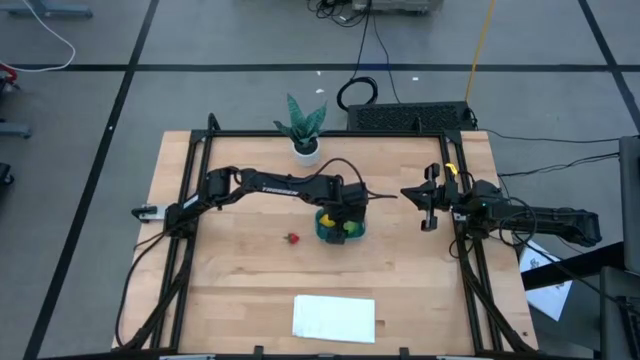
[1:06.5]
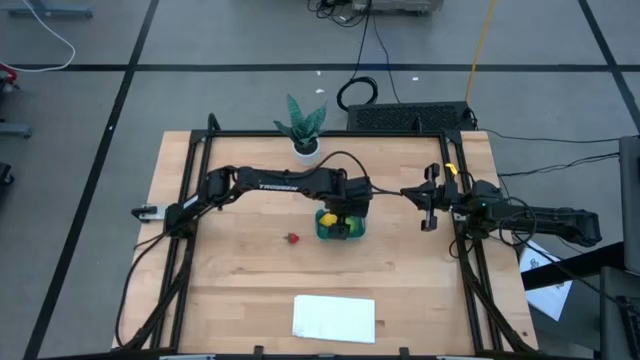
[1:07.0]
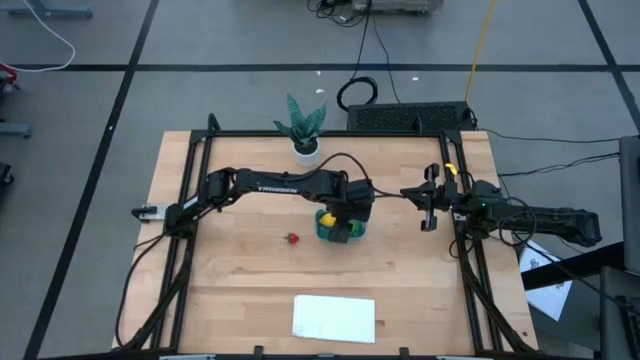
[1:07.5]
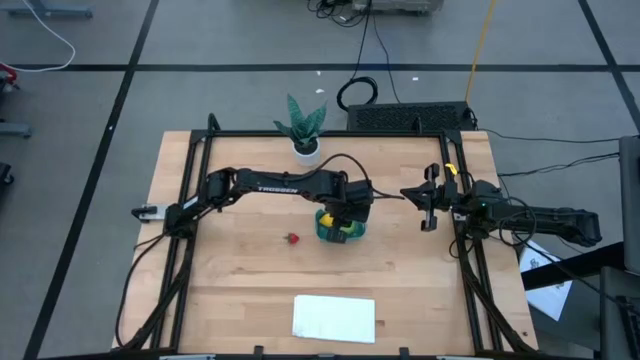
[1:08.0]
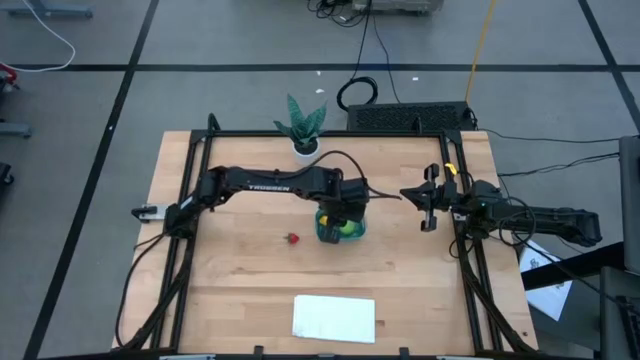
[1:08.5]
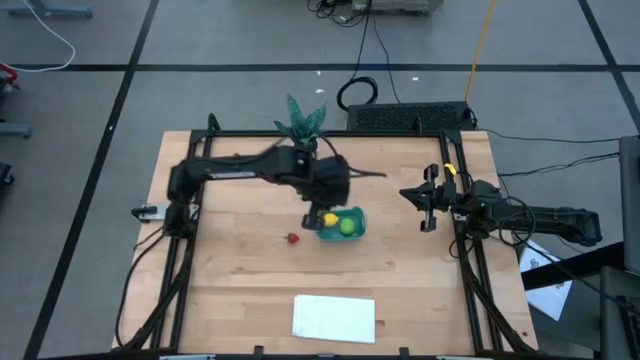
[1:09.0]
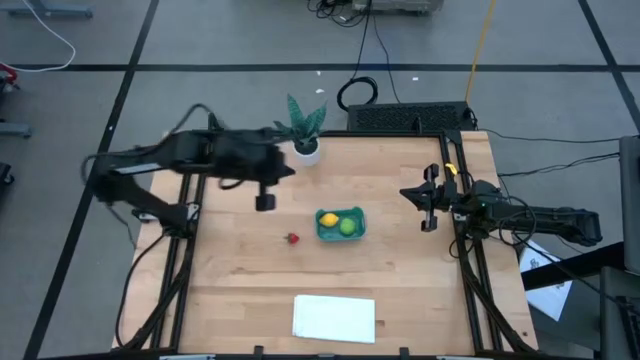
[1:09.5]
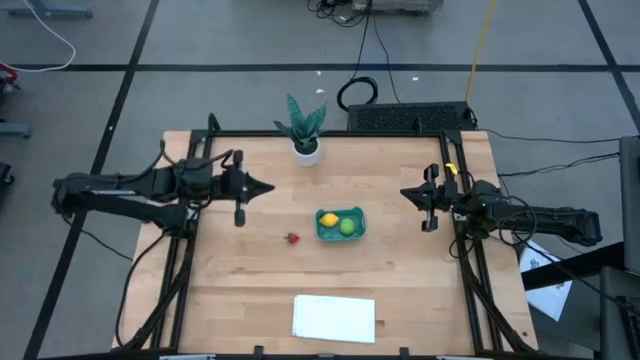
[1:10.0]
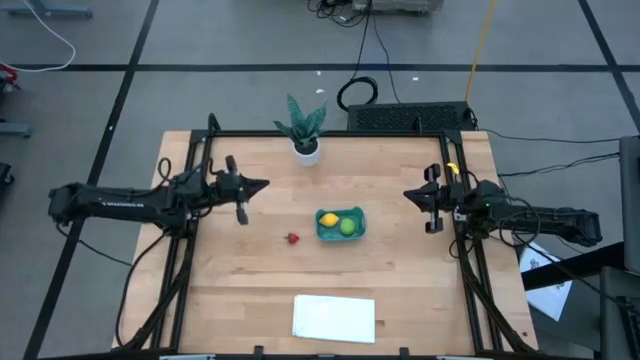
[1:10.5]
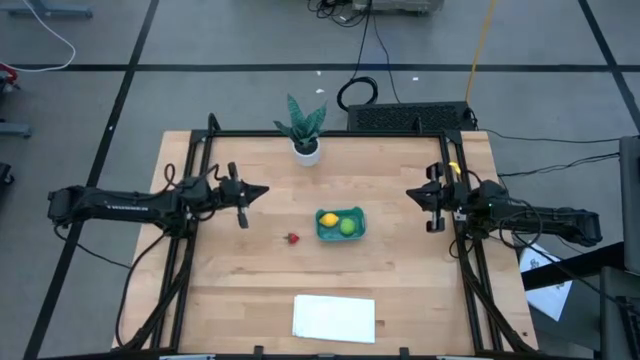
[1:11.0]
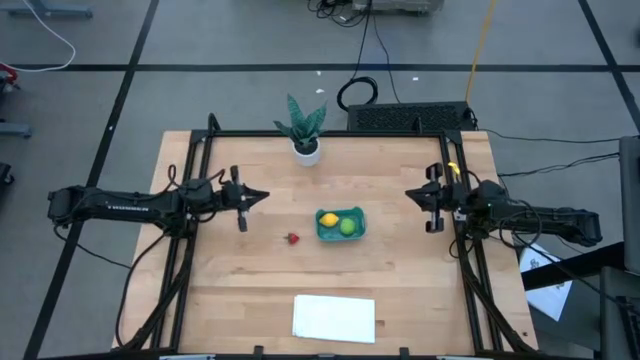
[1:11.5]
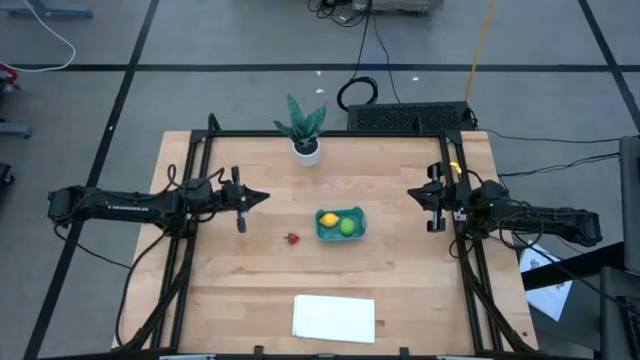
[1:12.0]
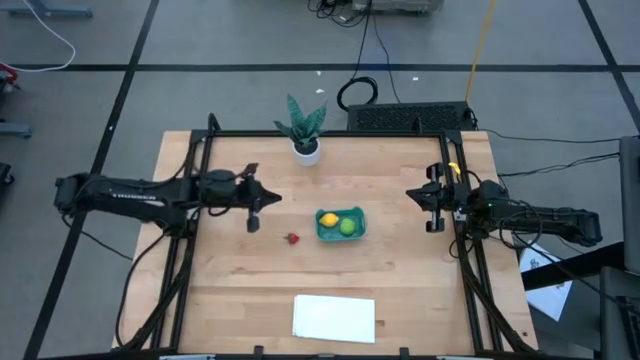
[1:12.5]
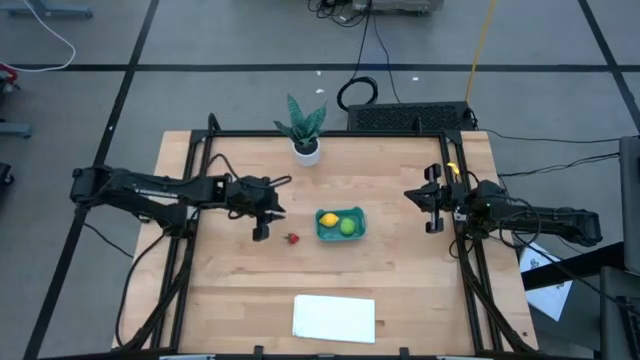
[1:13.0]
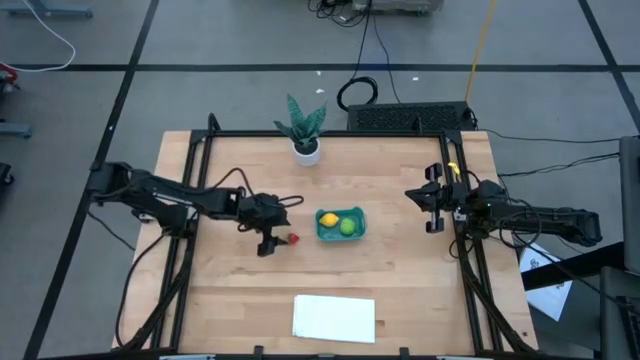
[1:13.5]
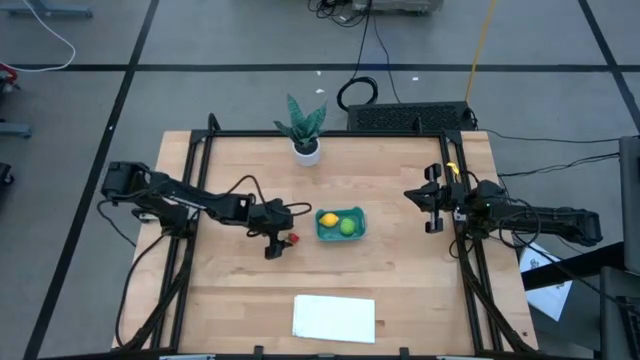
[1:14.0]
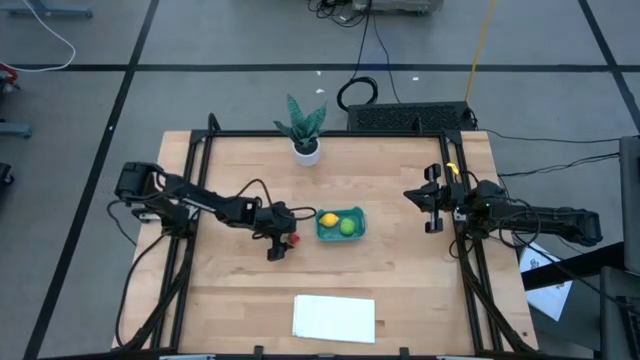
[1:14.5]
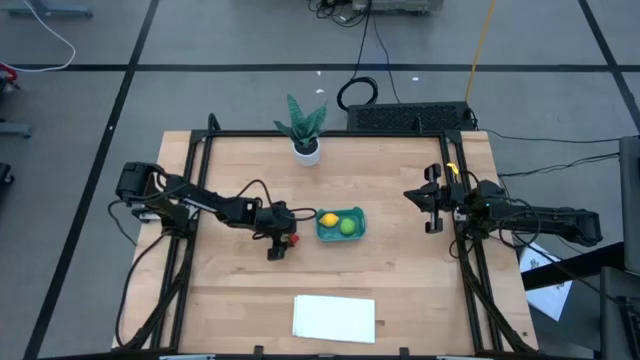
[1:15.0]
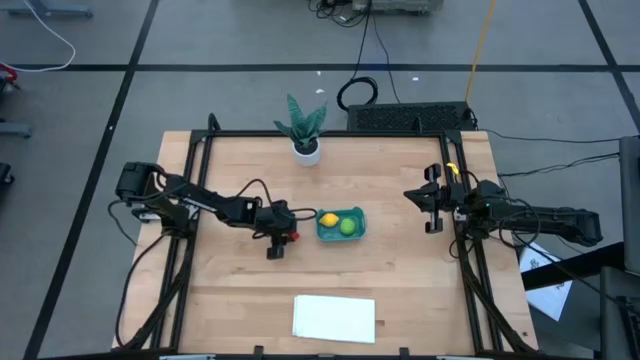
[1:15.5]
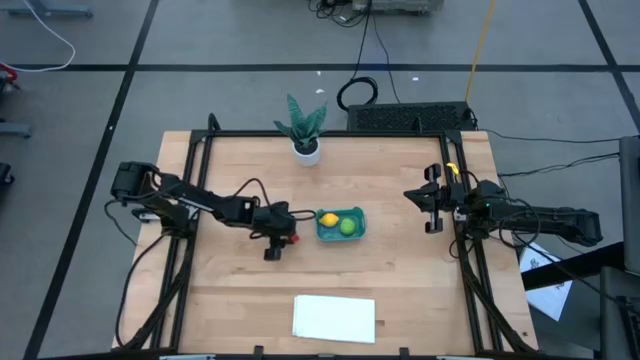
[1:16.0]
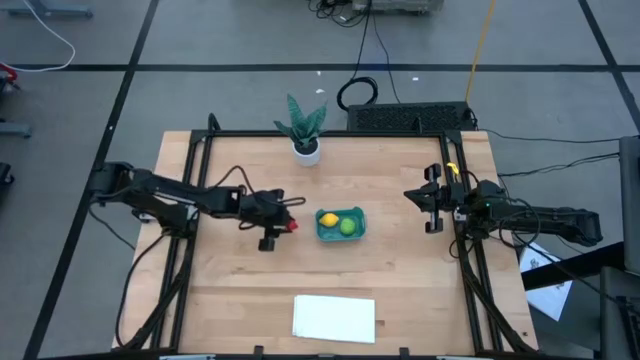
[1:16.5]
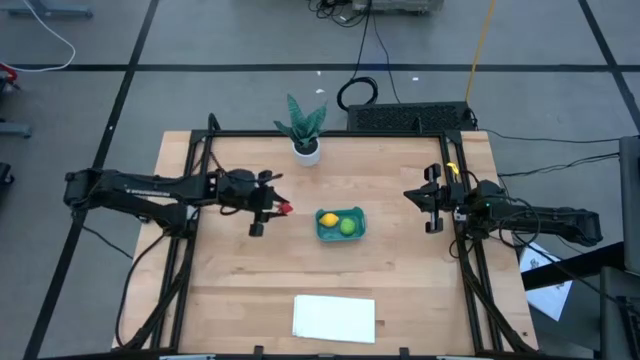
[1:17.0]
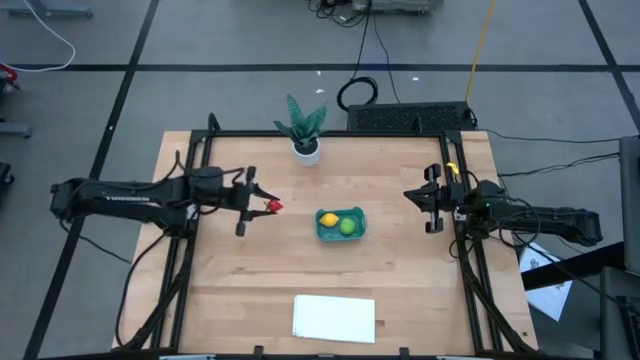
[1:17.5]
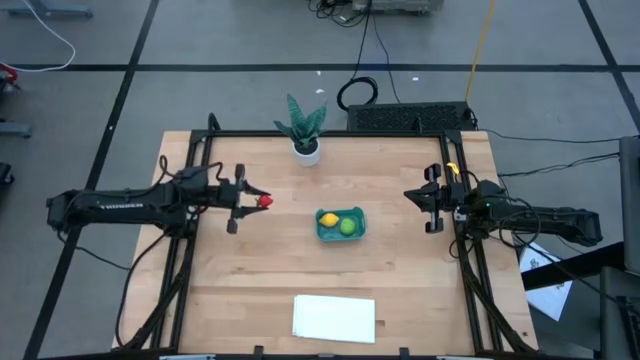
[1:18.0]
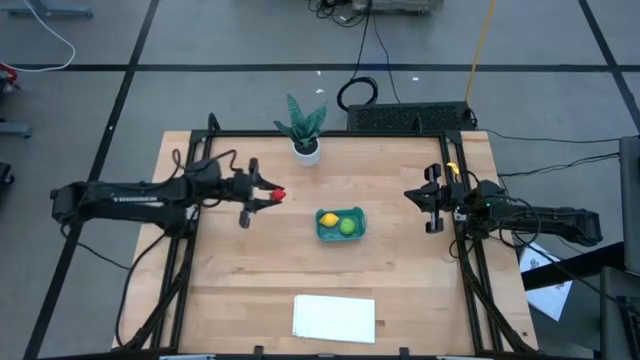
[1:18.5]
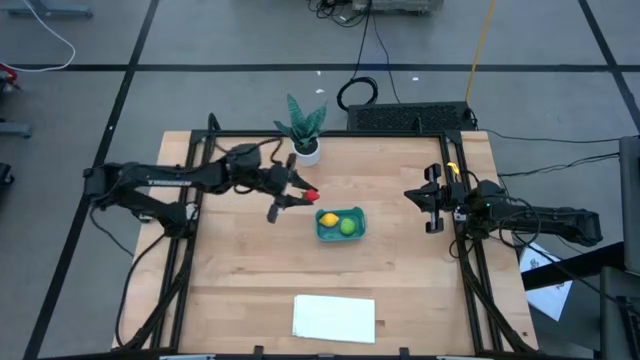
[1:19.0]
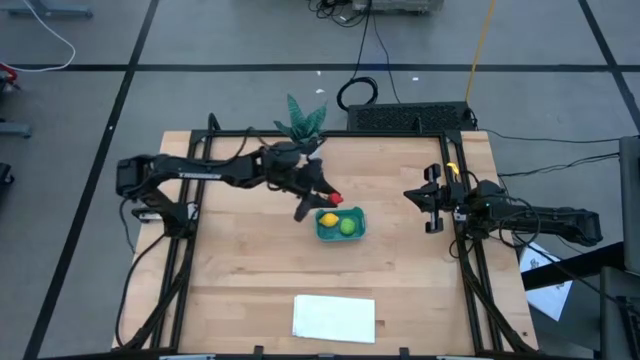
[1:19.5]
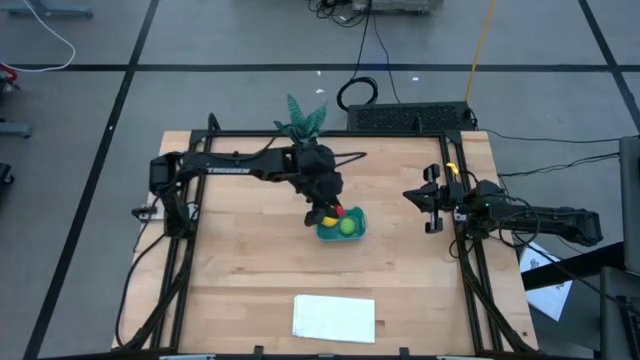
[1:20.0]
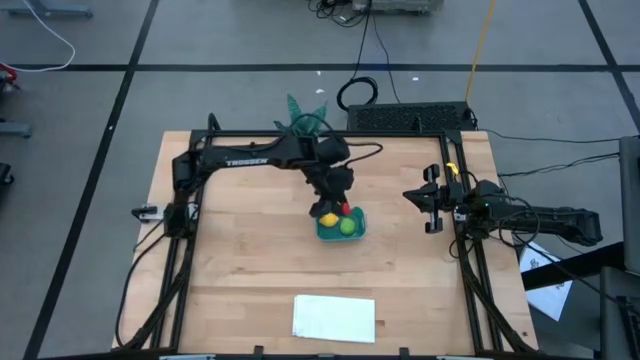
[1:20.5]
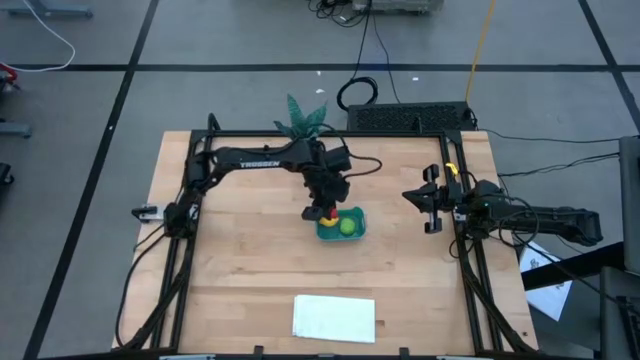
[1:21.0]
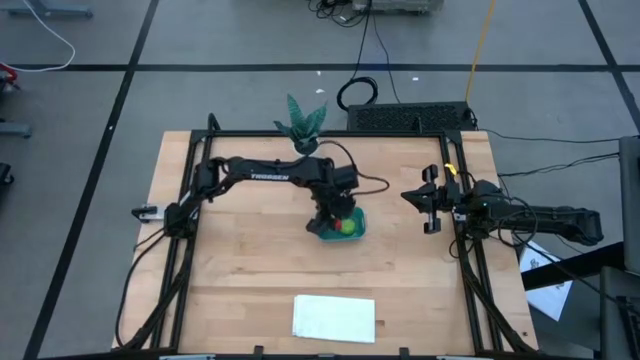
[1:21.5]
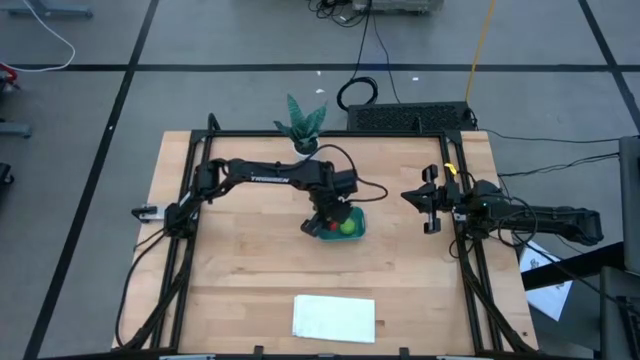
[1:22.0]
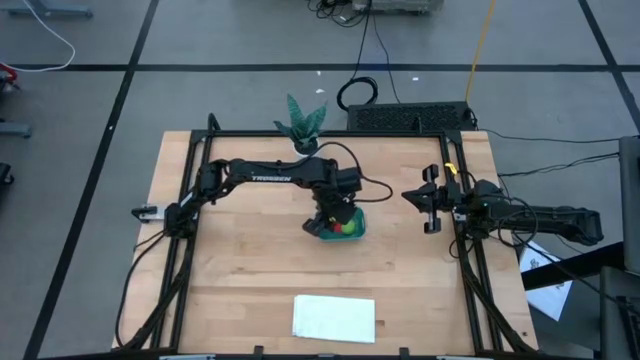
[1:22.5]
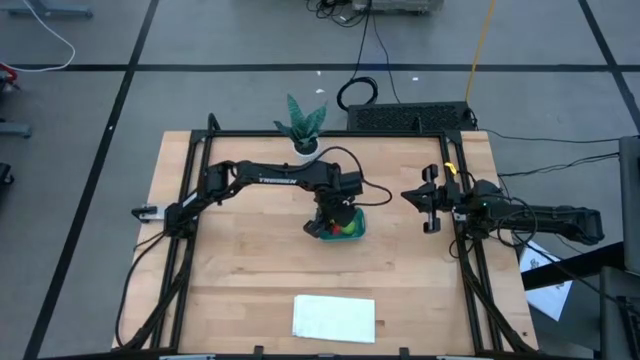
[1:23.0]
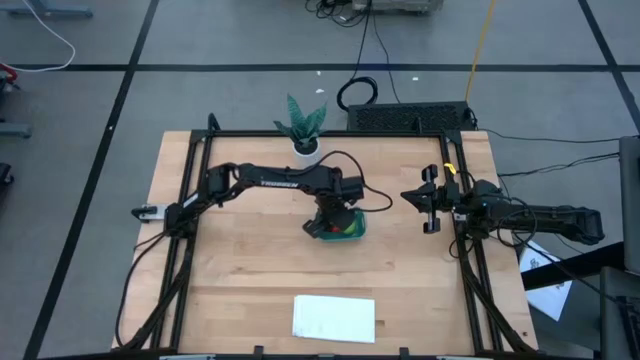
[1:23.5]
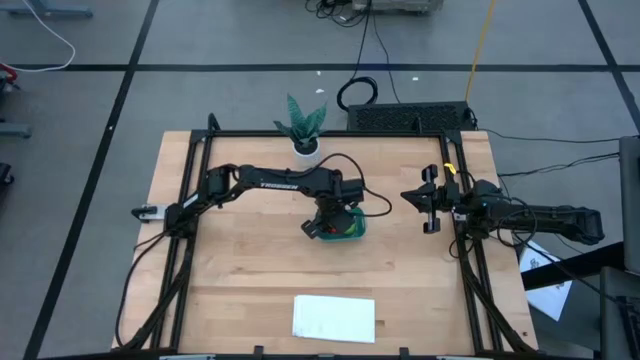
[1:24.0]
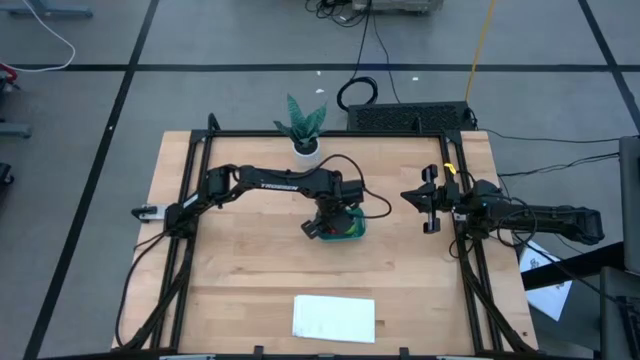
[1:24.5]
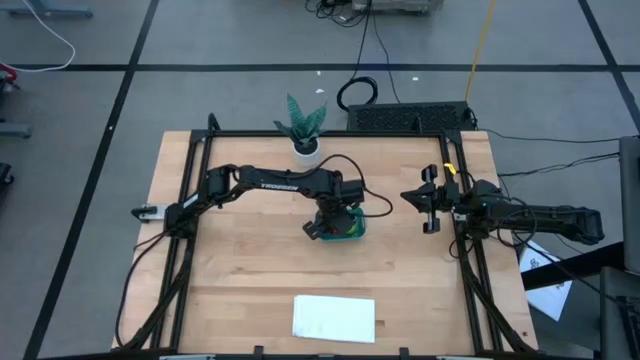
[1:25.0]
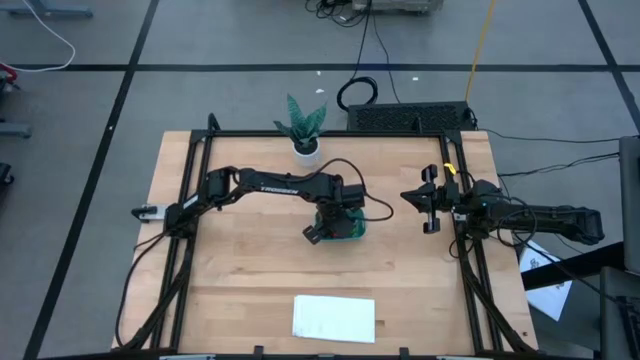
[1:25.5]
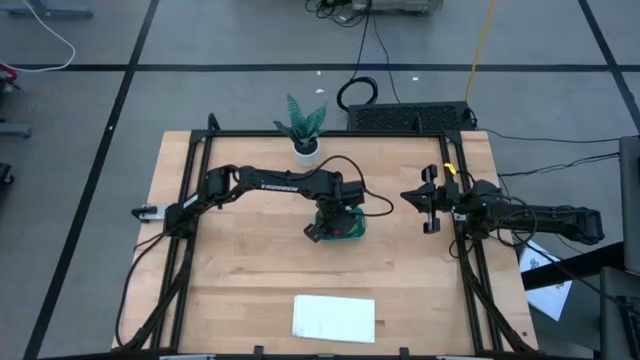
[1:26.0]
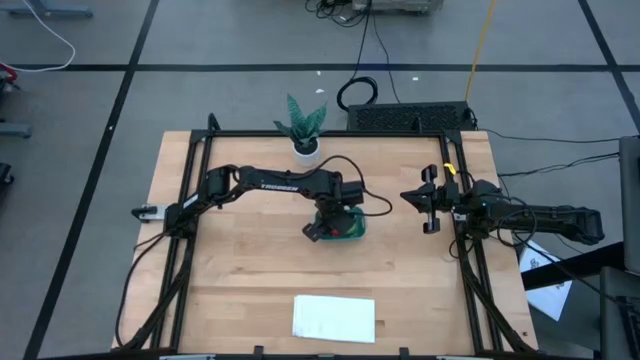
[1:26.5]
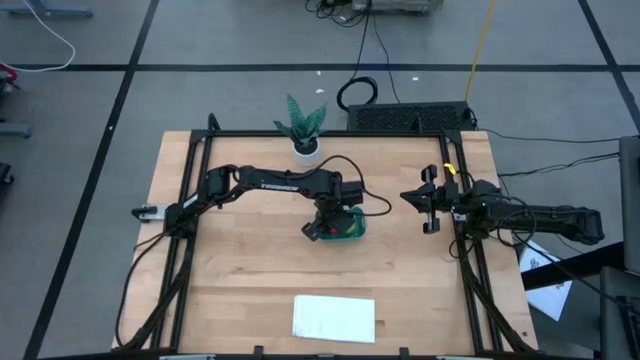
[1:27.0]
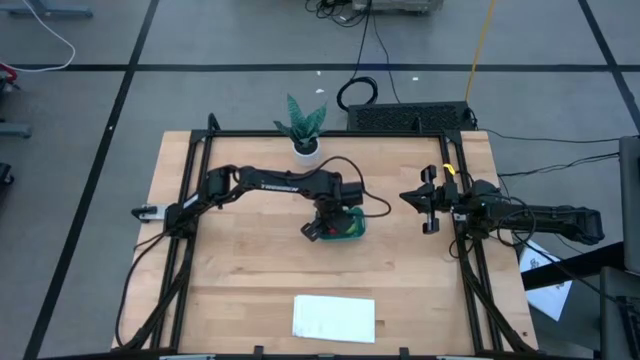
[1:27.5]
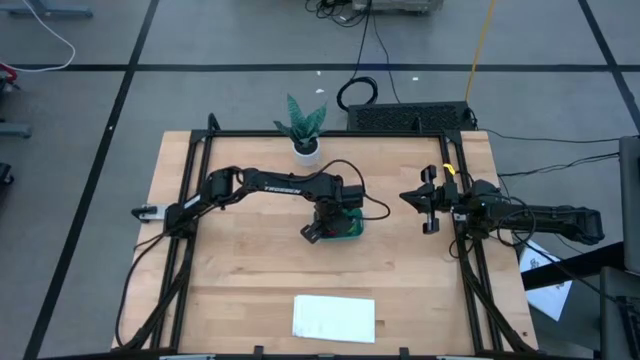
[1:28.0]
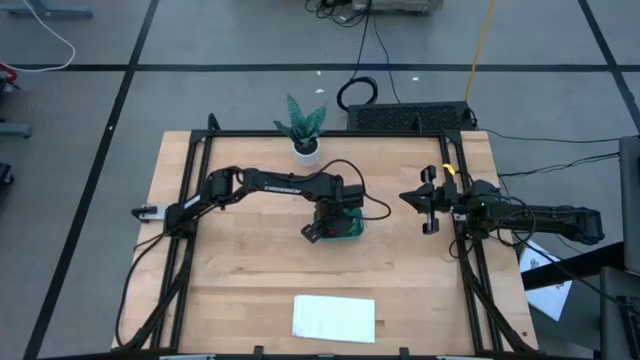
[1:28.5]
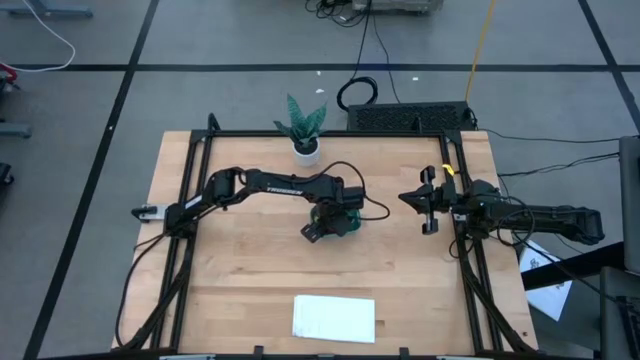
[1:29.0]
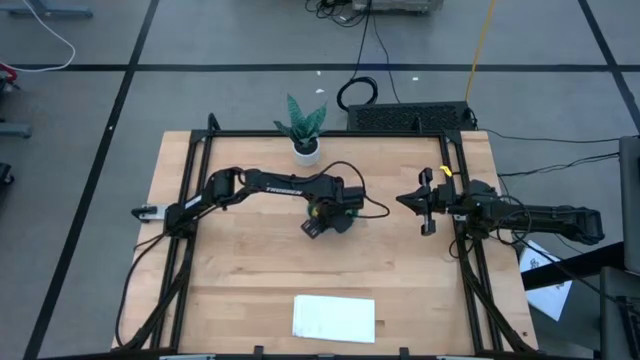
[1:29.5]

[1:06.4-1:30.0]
Task: Pick and placing Produce into tupperware
Put the strawberry into the green bin
